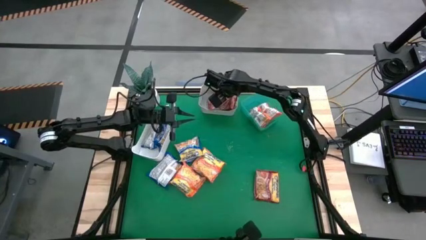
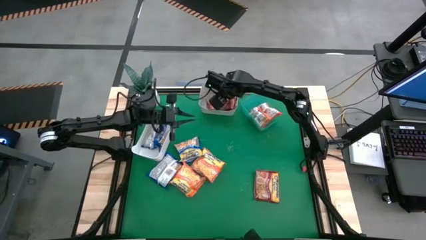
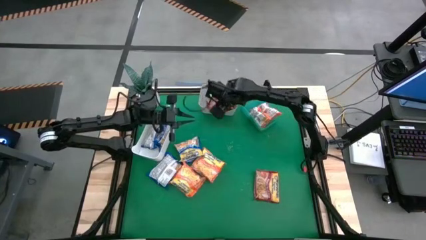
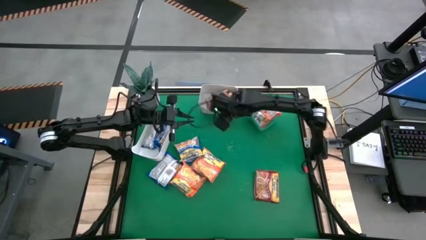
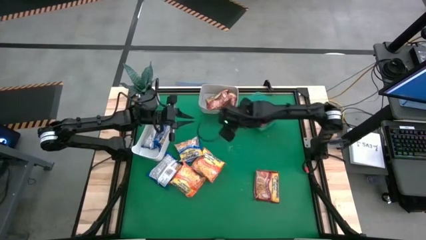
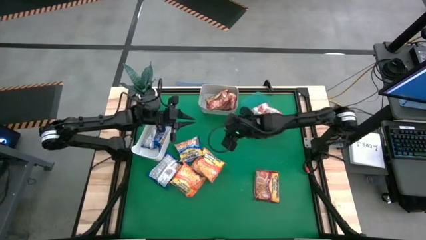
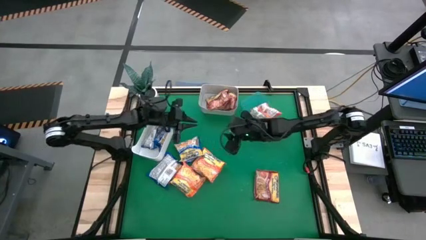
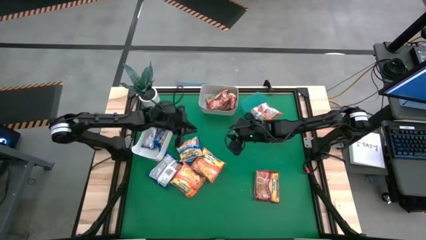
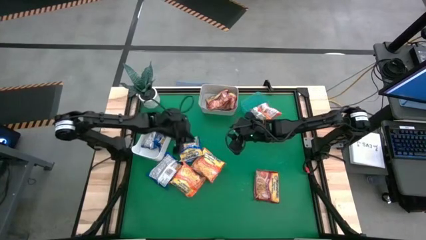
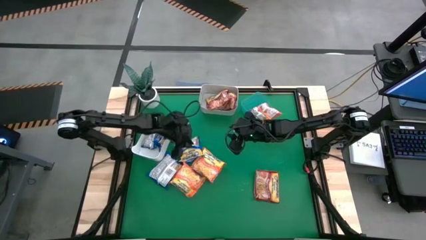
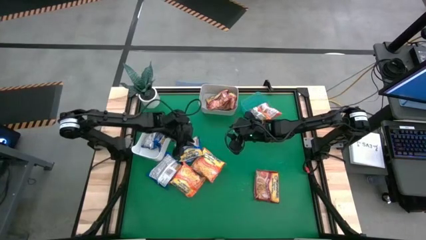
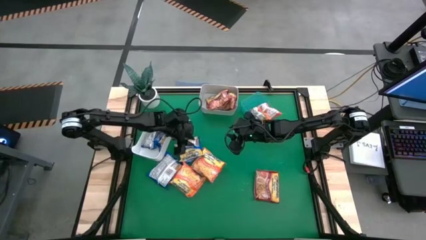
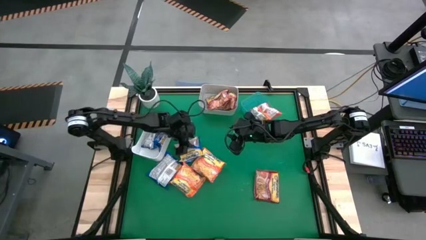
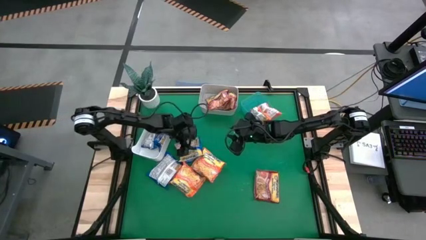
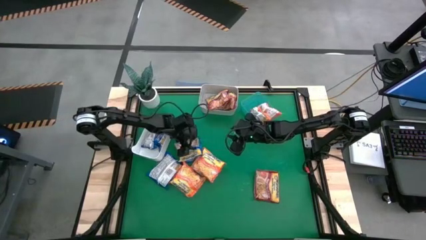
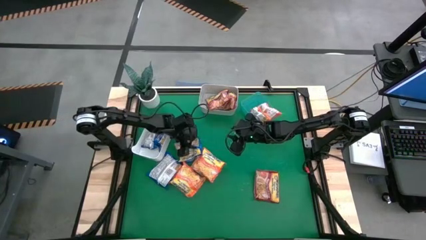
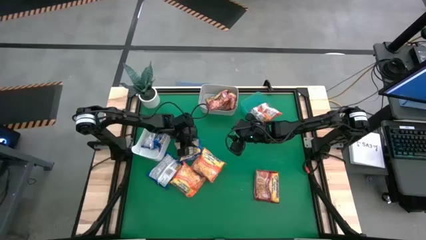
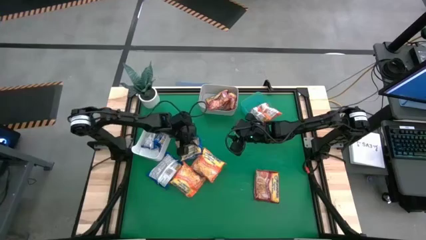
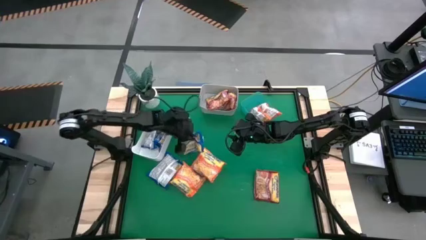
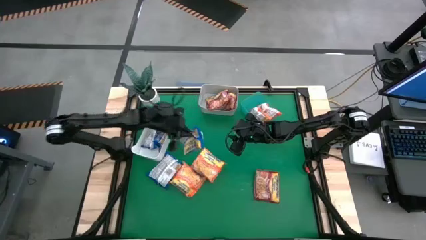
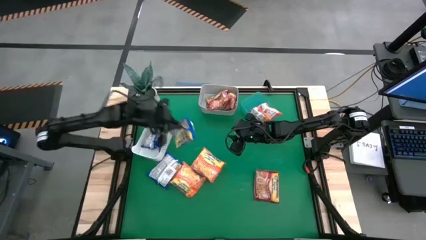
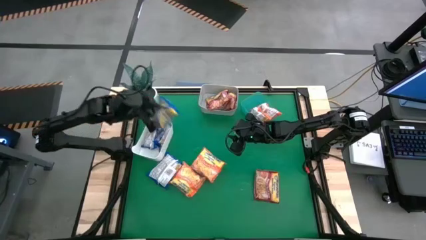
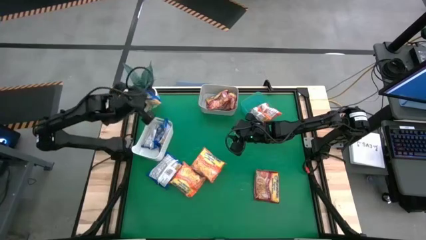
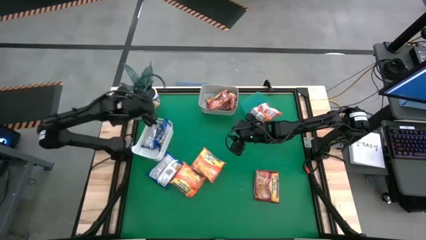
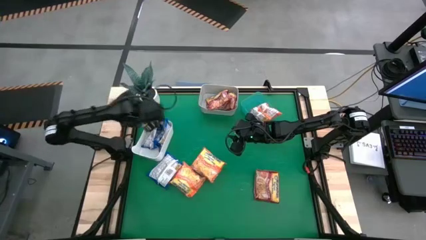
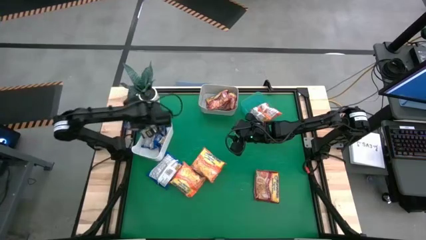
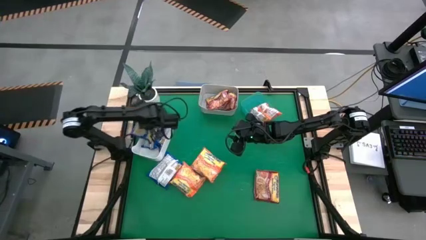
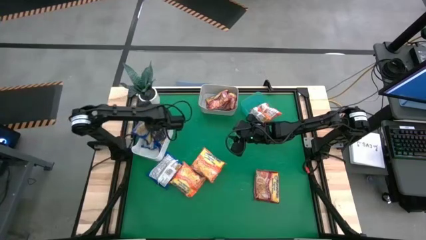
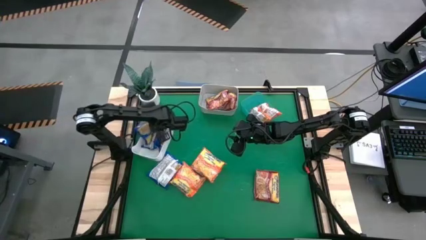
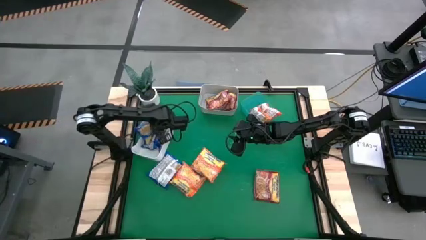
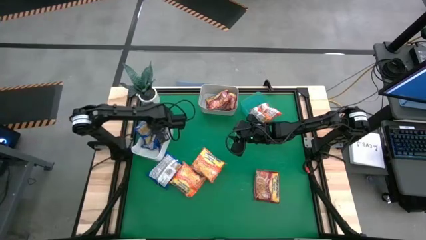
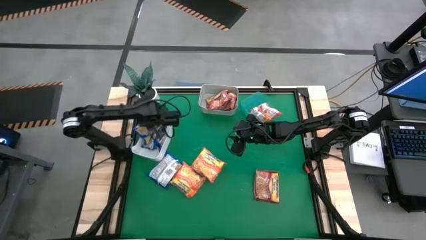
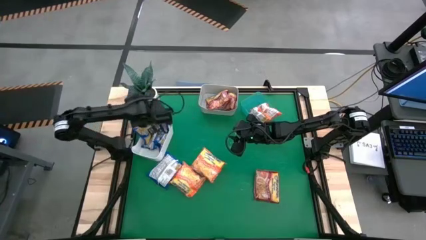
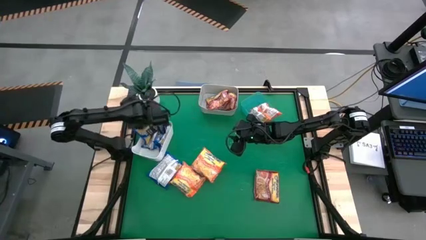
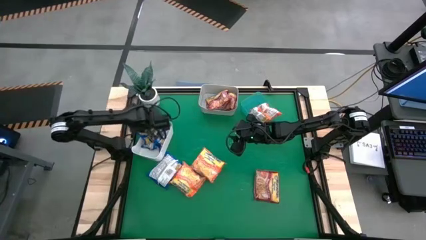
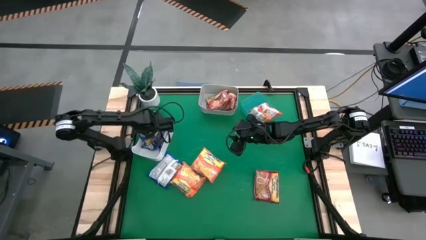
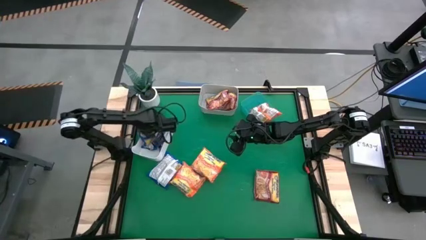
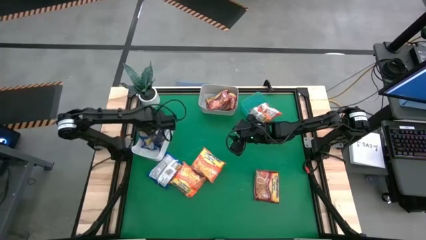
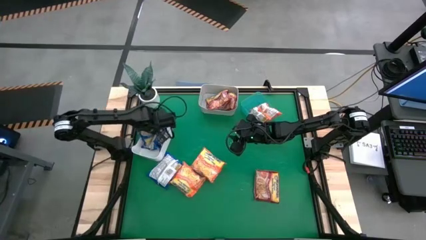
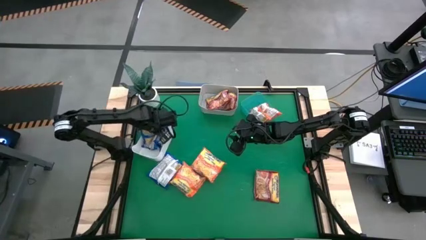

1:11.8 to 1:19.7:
Task: Sort Maruchan noodles
Put the blue noodle pack into the white bin

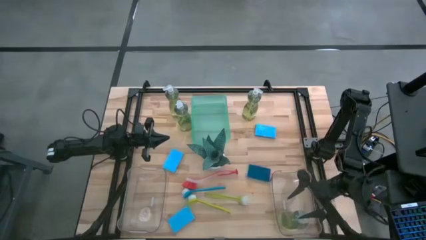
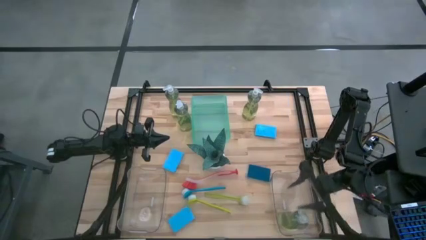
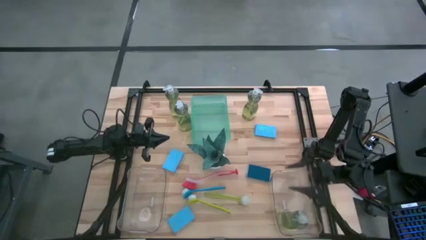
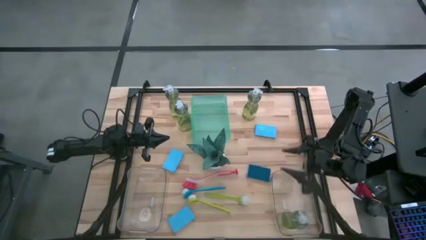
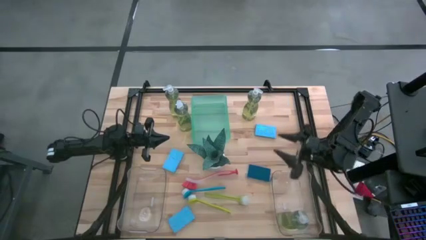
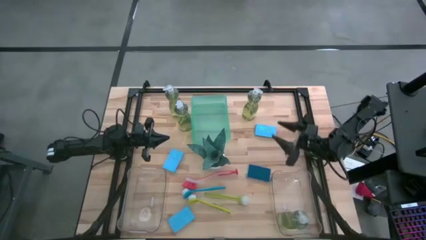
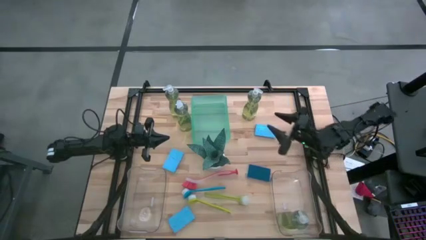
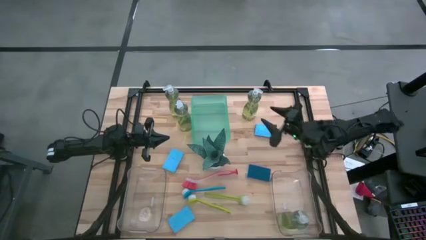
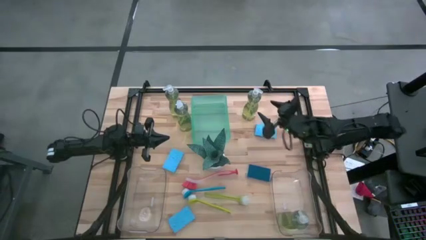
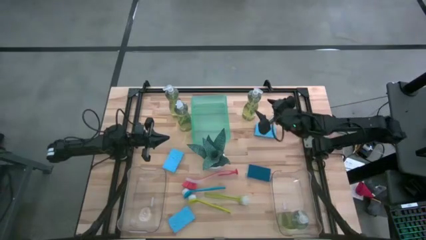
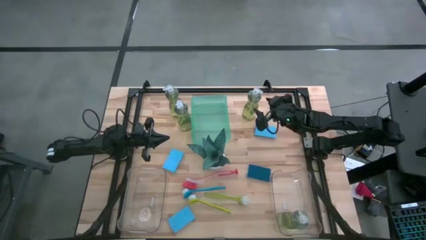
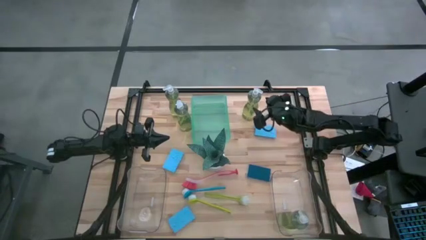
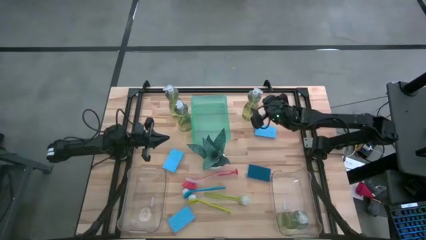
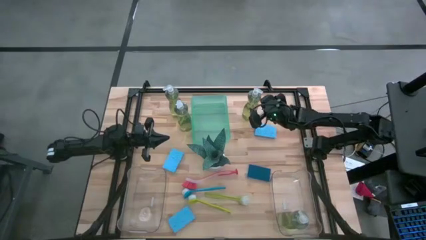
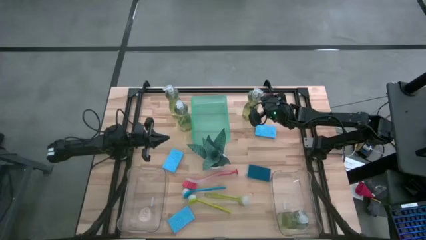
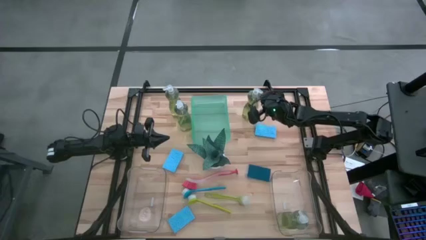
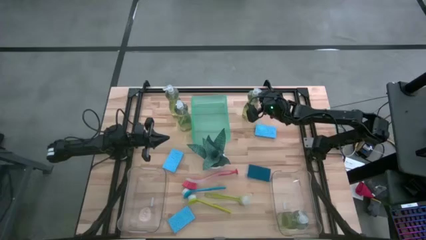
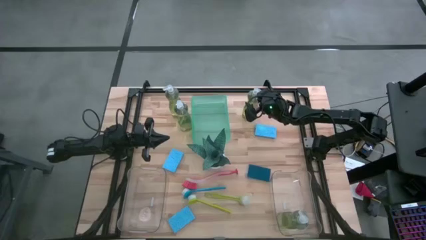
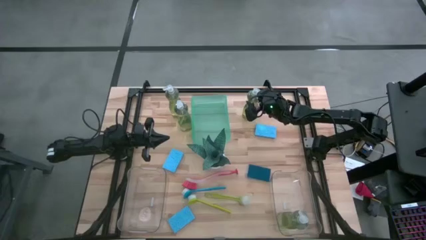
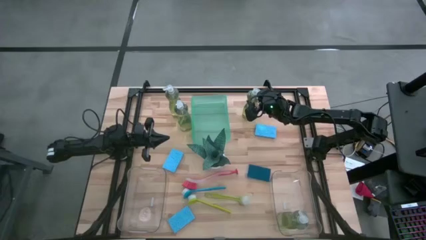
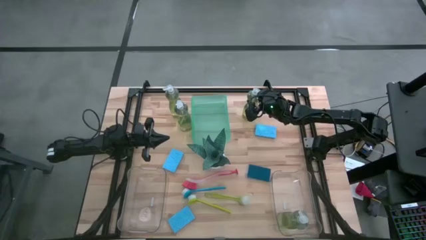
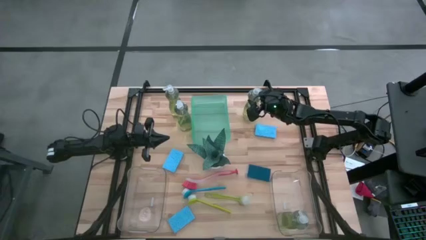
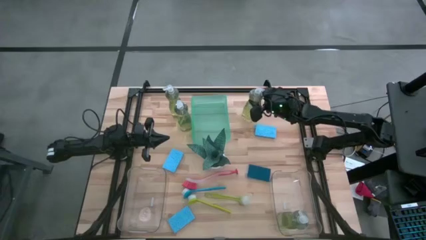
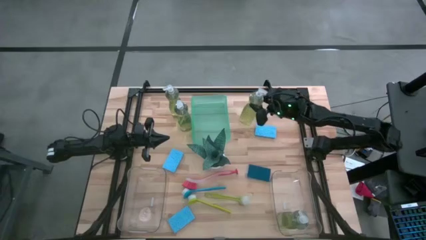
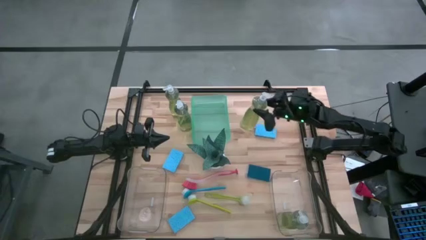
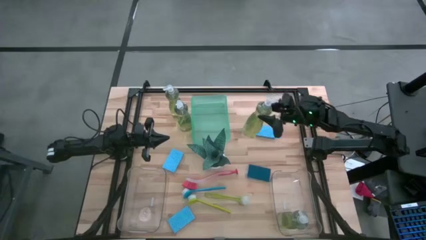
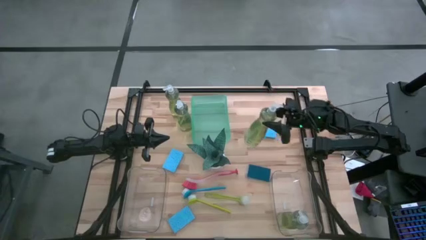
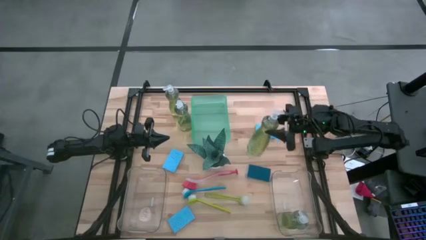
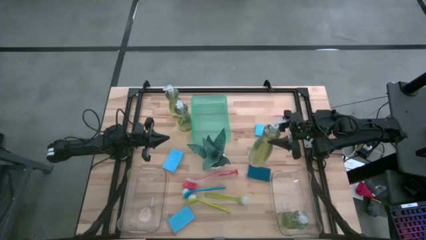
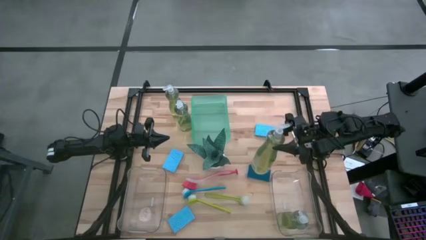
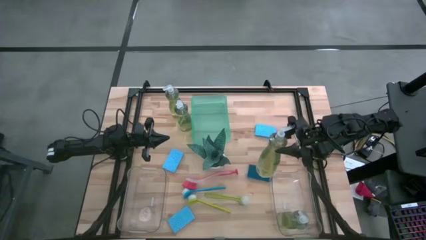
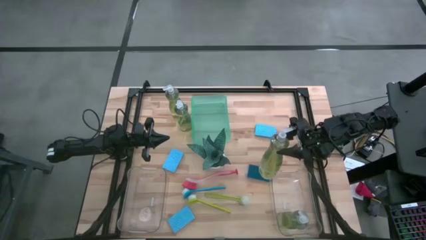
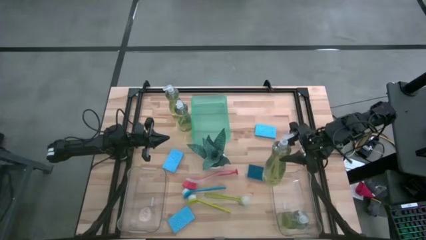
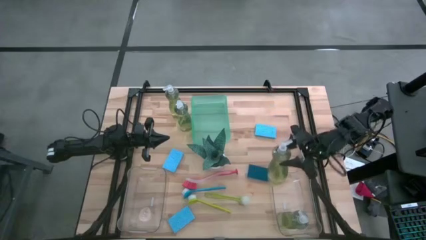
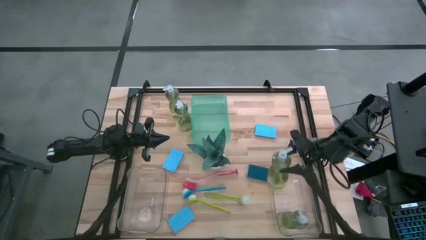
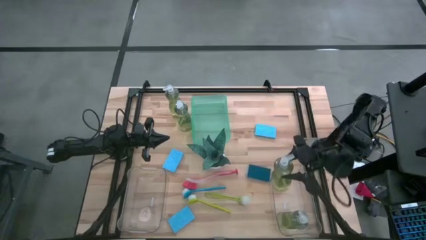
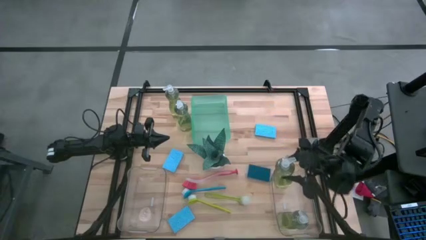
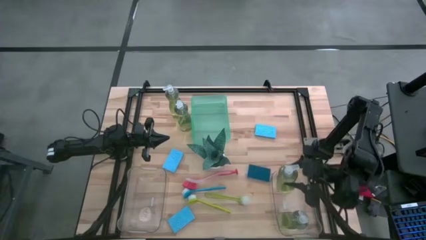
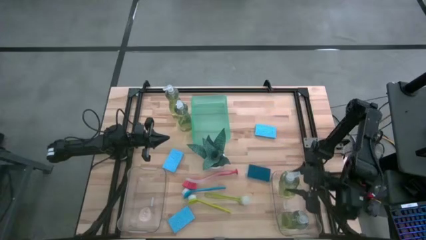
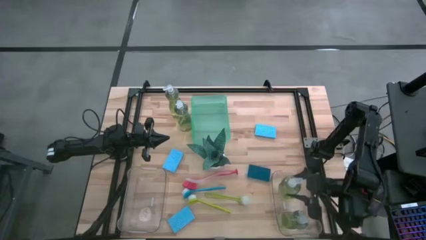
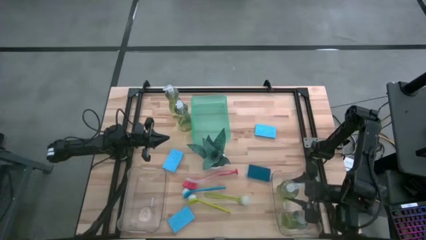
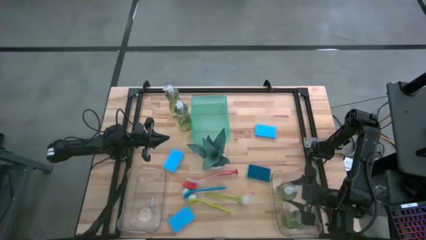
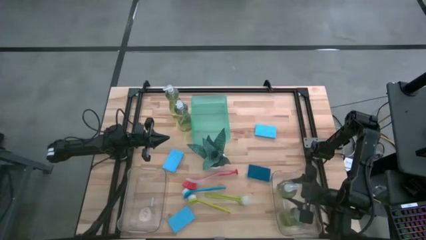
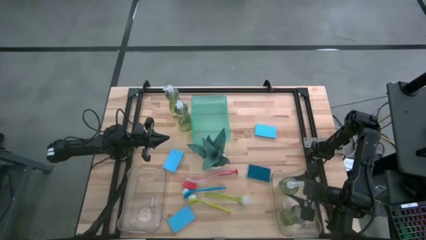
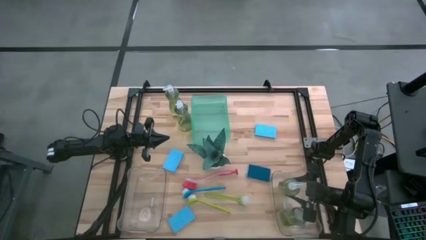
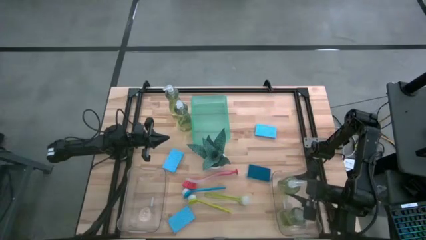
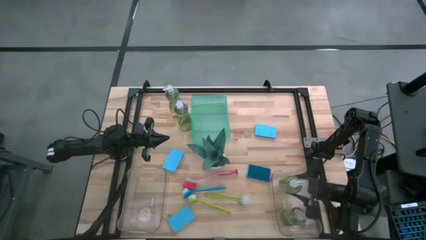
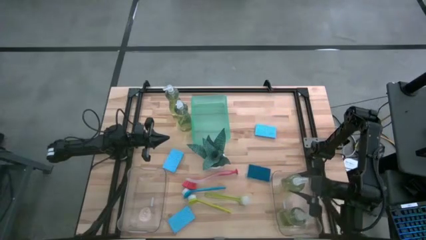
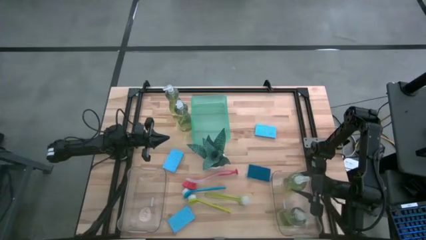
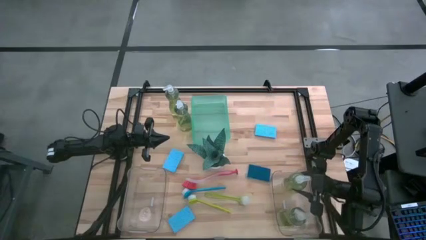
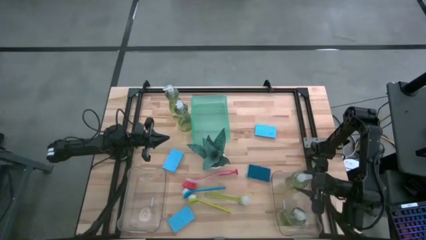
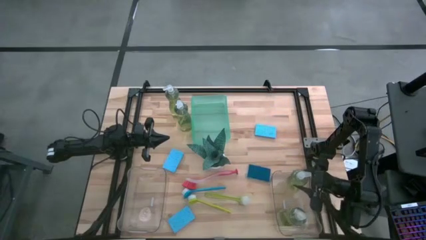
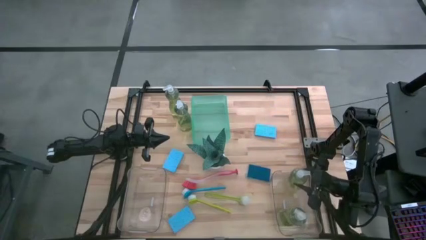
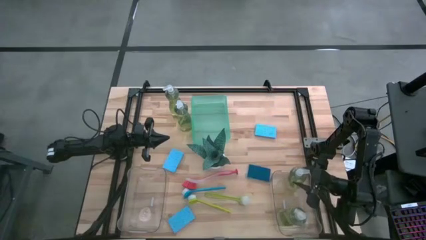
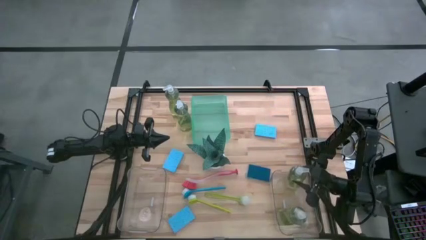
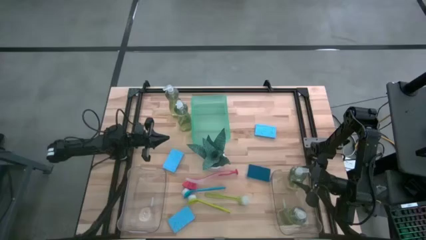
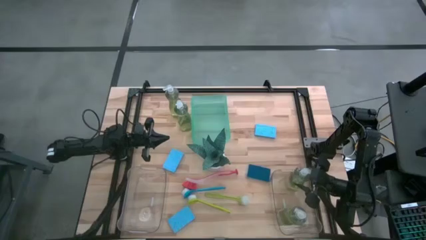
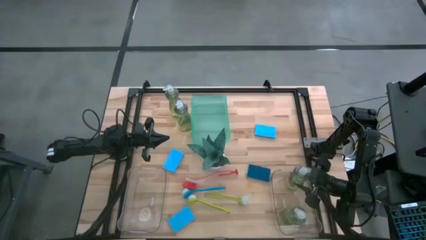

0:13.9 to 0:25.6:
Task: Pick & Place Kitchen Sink Supplies
Put the yellow soap dispenser into the right transparent bin
